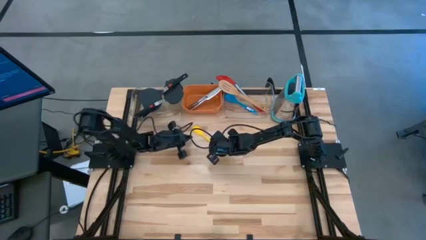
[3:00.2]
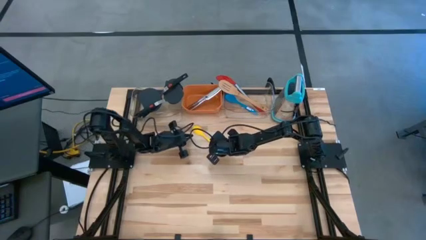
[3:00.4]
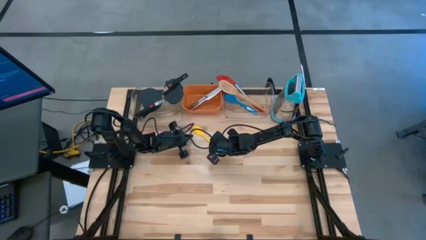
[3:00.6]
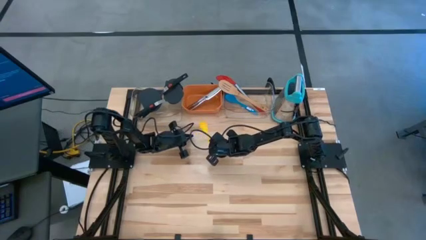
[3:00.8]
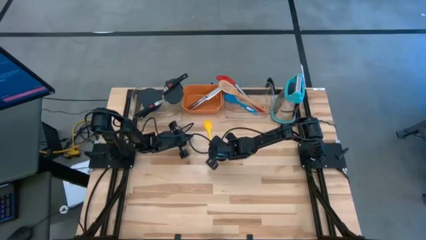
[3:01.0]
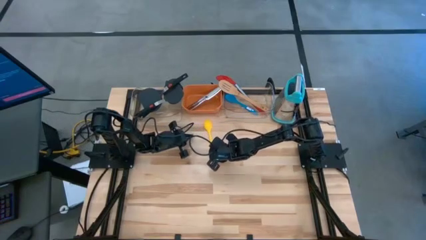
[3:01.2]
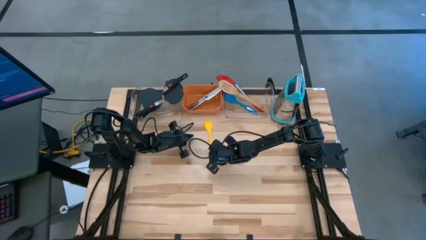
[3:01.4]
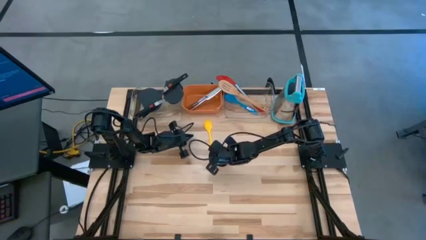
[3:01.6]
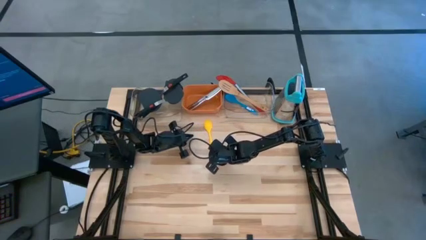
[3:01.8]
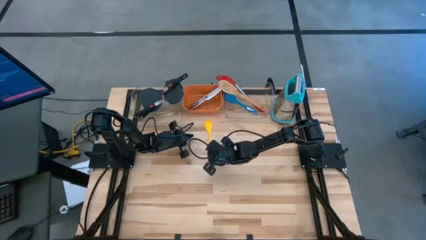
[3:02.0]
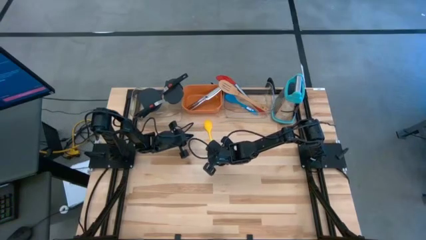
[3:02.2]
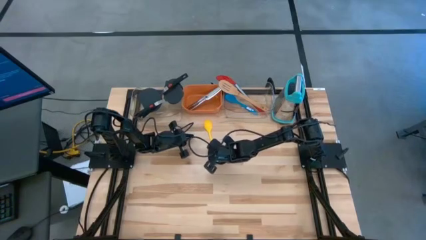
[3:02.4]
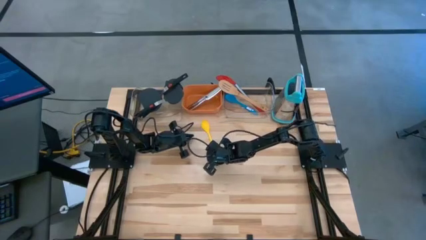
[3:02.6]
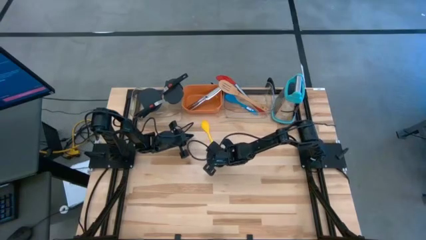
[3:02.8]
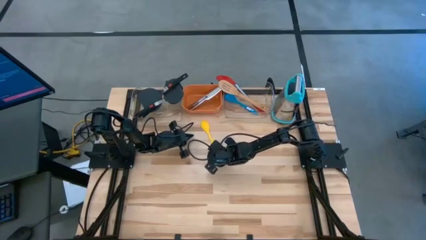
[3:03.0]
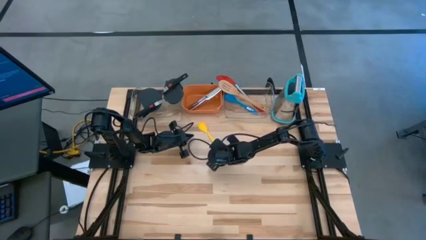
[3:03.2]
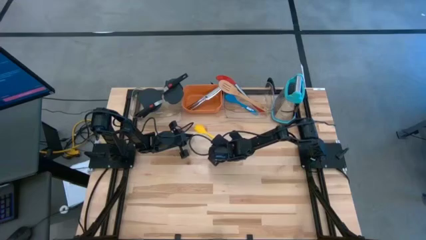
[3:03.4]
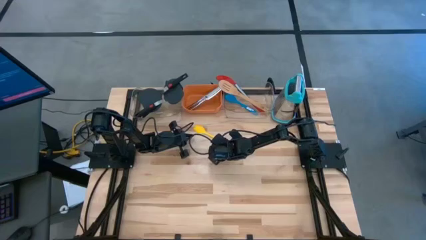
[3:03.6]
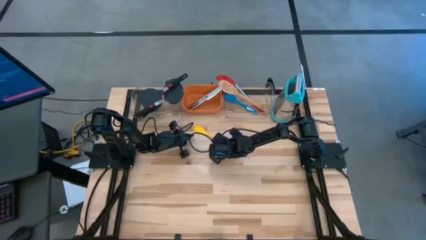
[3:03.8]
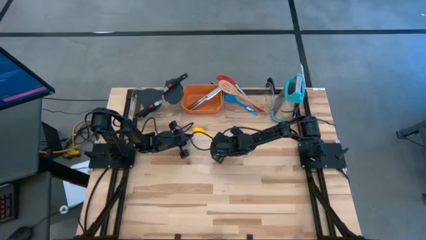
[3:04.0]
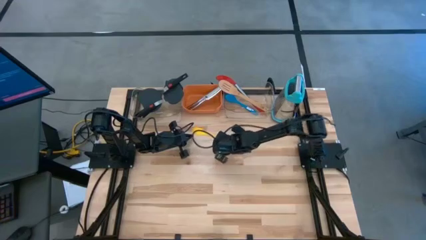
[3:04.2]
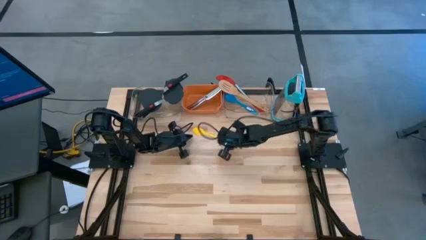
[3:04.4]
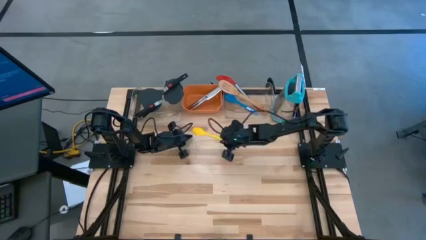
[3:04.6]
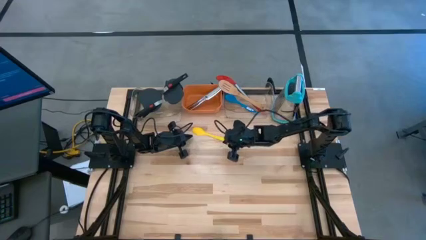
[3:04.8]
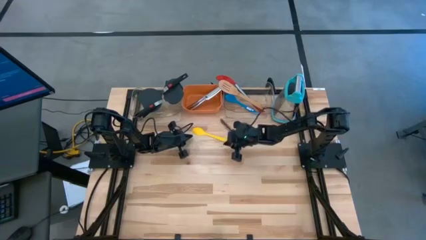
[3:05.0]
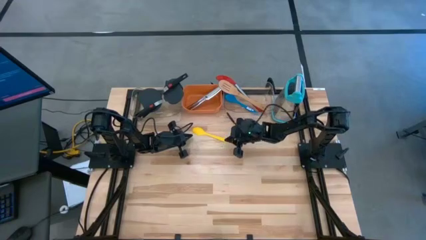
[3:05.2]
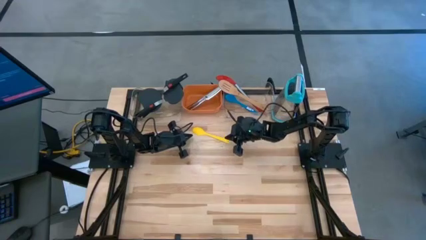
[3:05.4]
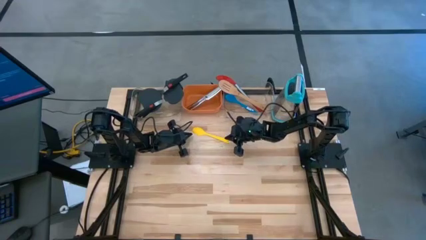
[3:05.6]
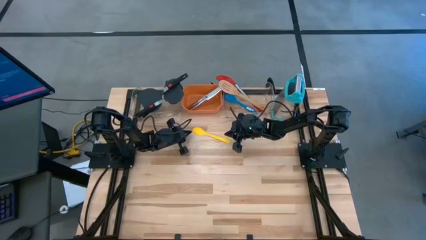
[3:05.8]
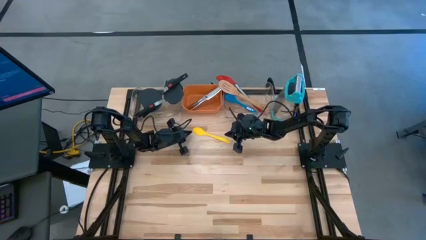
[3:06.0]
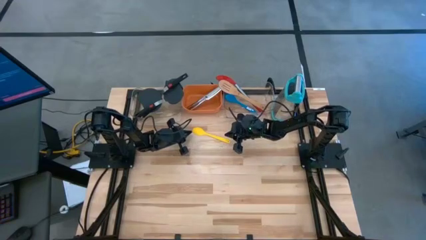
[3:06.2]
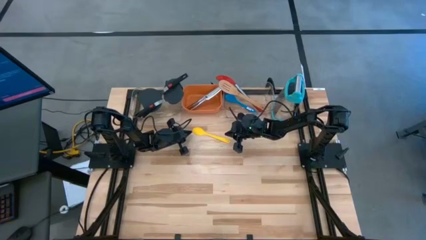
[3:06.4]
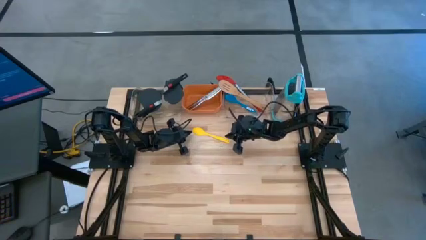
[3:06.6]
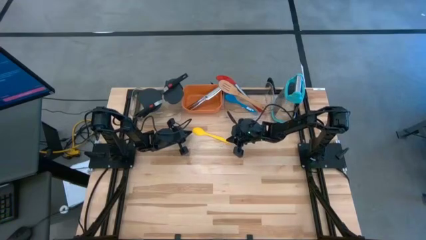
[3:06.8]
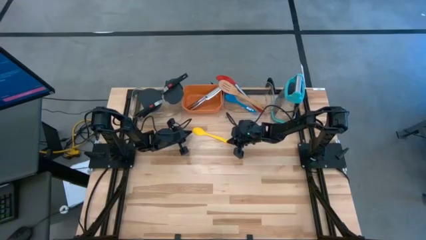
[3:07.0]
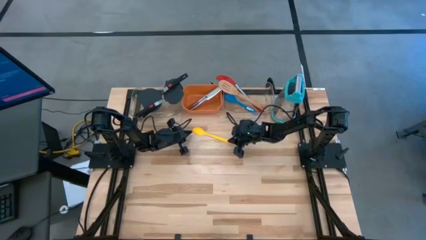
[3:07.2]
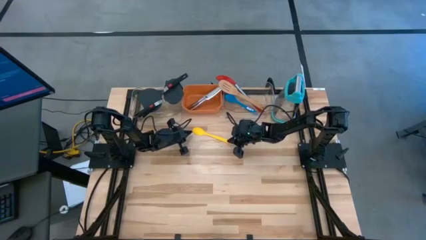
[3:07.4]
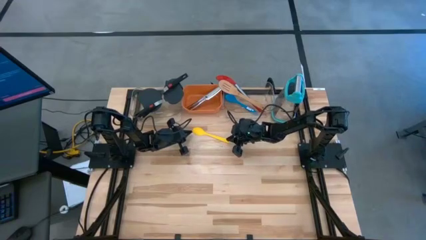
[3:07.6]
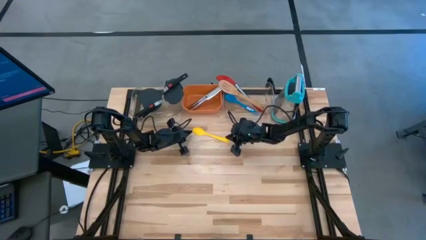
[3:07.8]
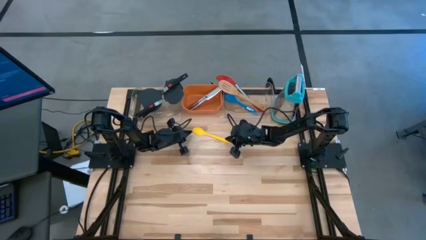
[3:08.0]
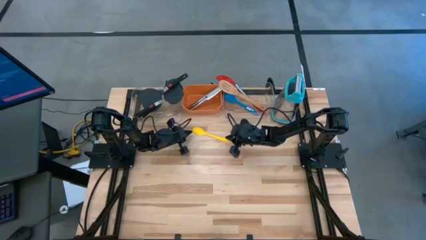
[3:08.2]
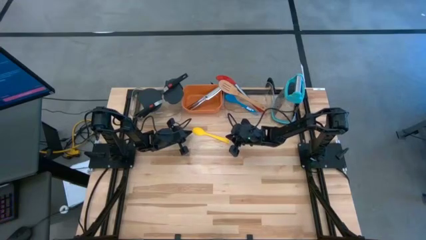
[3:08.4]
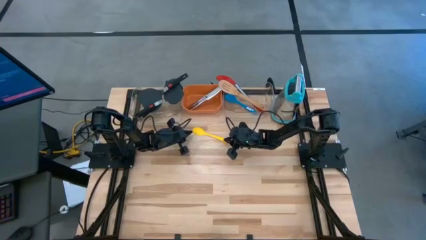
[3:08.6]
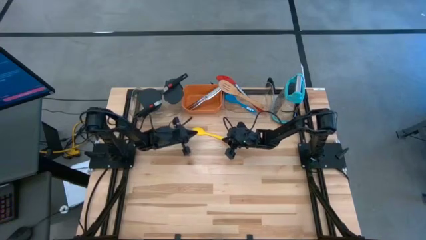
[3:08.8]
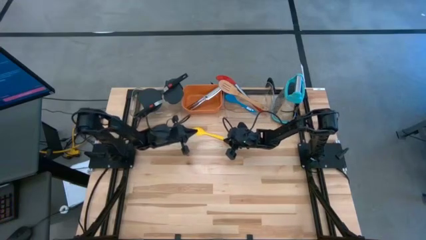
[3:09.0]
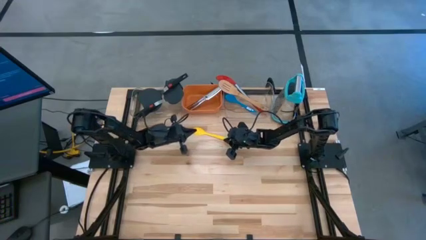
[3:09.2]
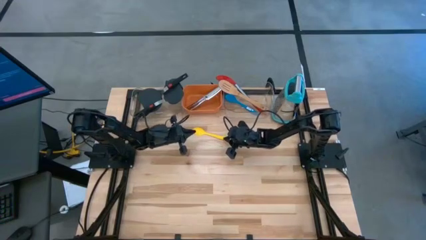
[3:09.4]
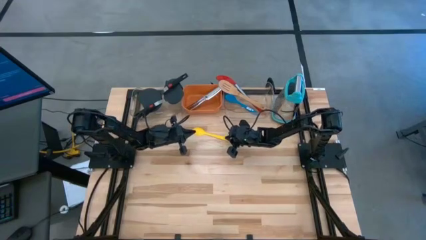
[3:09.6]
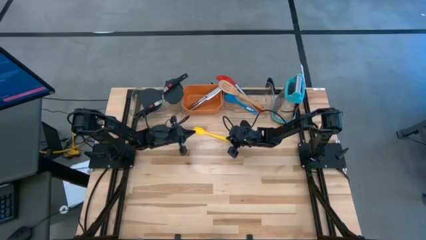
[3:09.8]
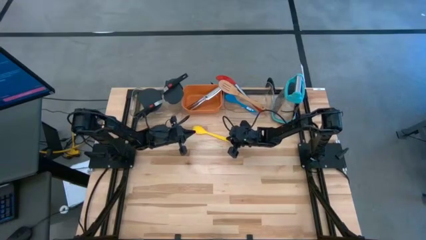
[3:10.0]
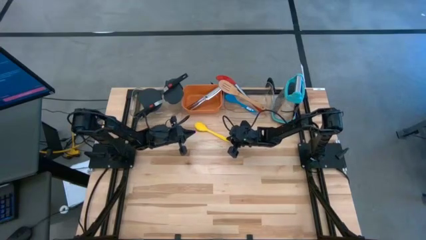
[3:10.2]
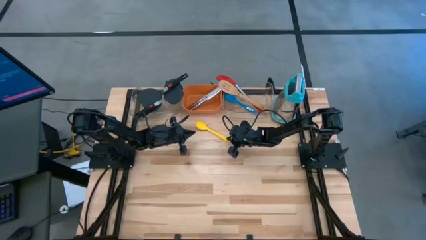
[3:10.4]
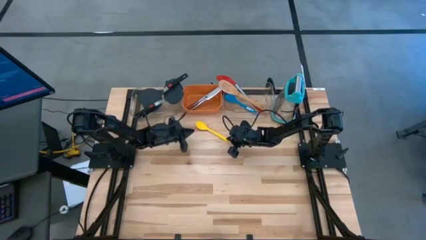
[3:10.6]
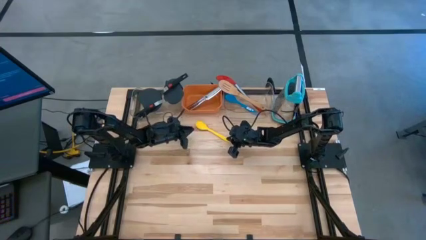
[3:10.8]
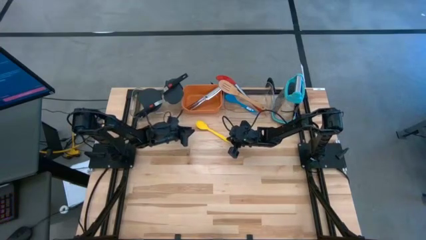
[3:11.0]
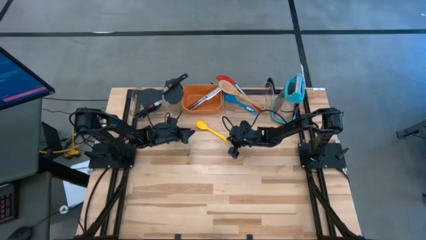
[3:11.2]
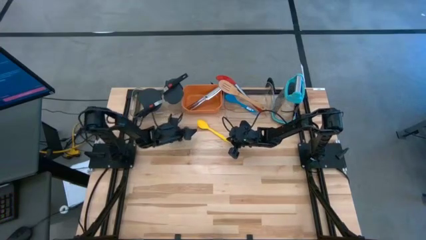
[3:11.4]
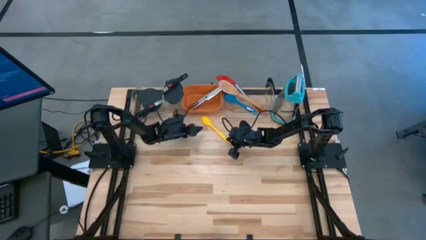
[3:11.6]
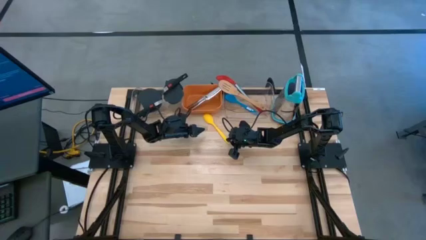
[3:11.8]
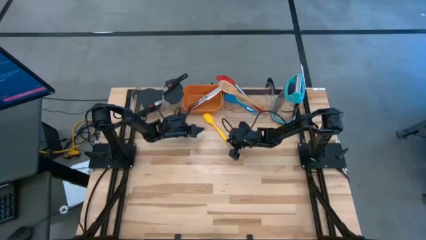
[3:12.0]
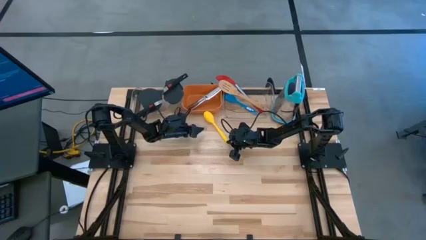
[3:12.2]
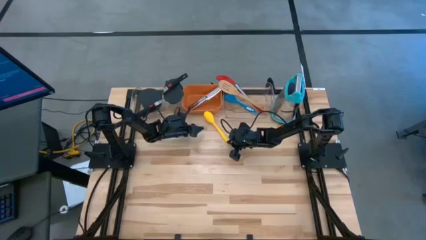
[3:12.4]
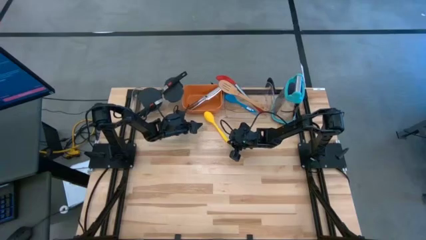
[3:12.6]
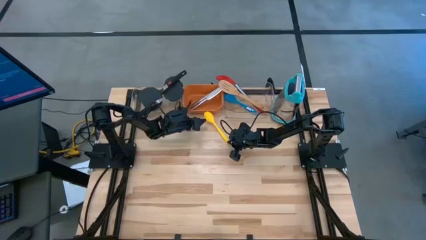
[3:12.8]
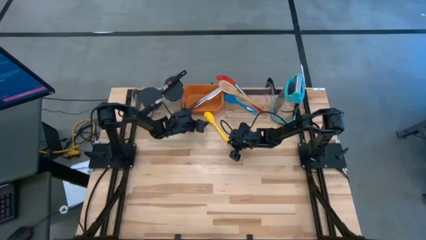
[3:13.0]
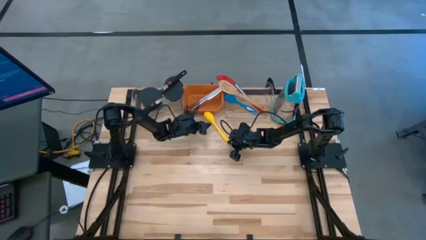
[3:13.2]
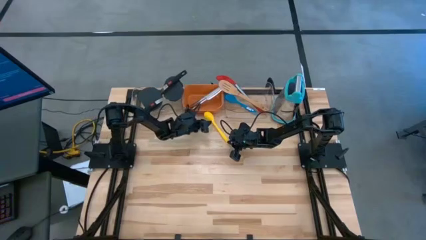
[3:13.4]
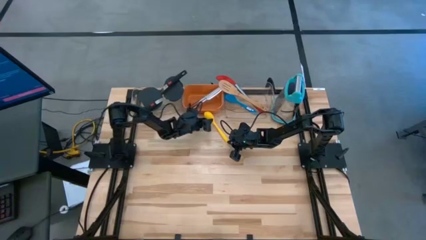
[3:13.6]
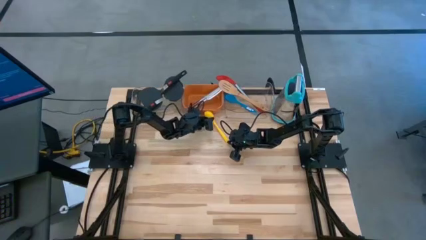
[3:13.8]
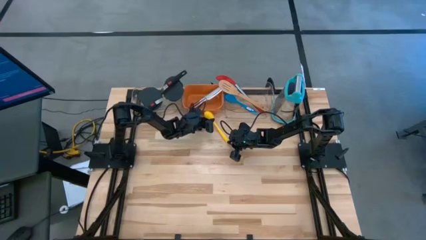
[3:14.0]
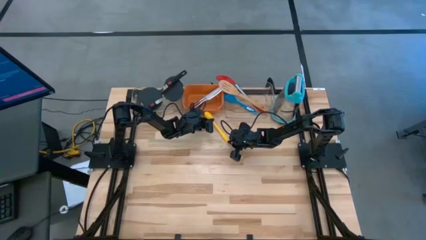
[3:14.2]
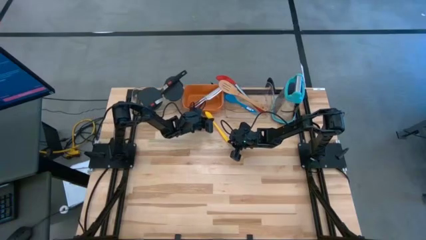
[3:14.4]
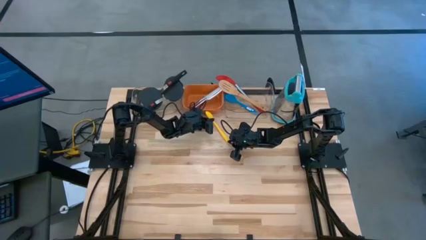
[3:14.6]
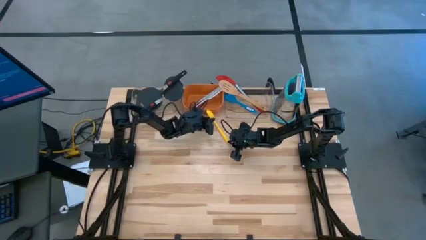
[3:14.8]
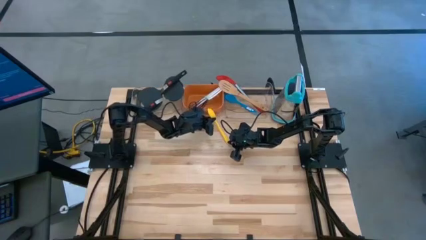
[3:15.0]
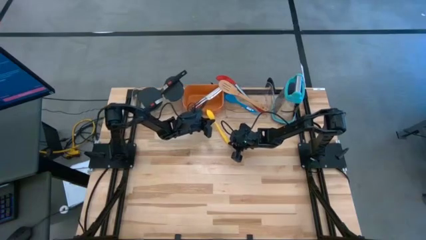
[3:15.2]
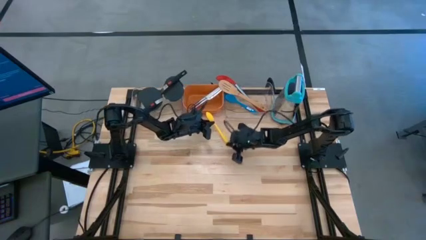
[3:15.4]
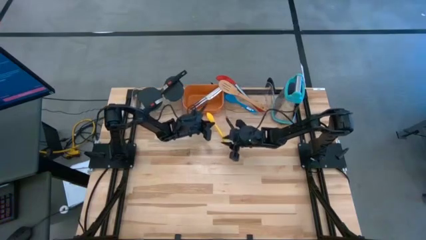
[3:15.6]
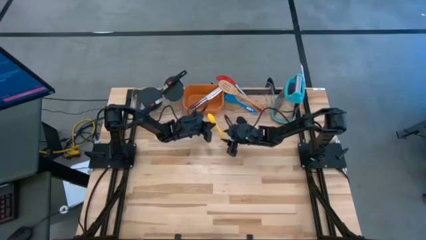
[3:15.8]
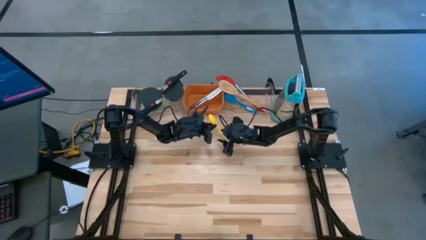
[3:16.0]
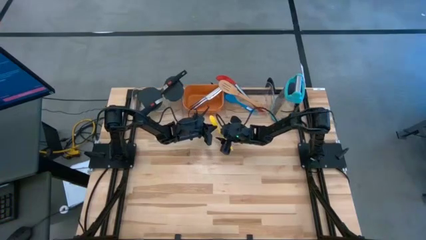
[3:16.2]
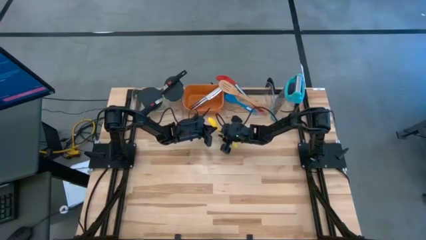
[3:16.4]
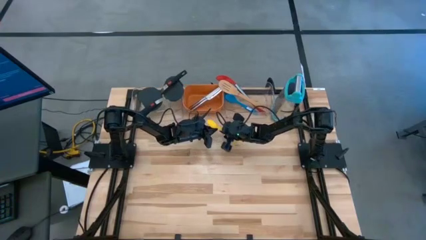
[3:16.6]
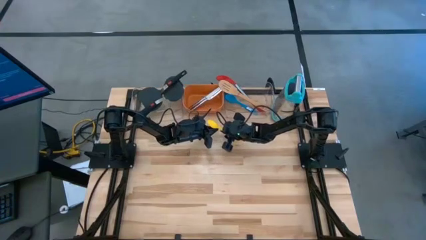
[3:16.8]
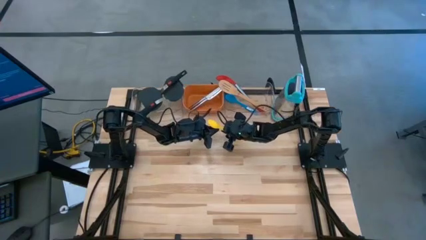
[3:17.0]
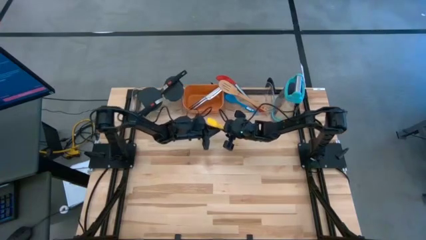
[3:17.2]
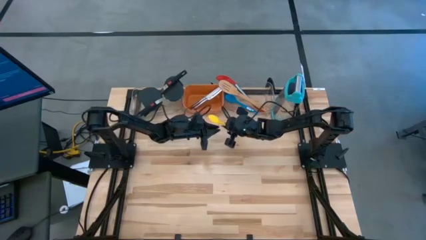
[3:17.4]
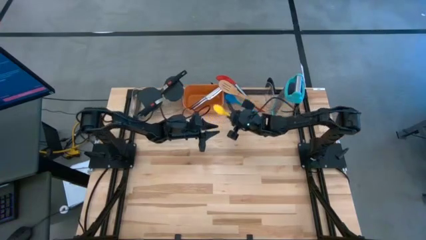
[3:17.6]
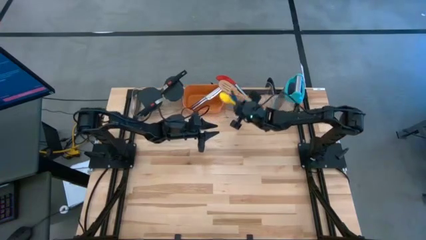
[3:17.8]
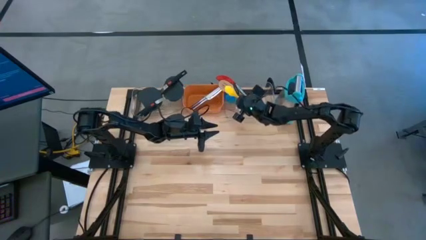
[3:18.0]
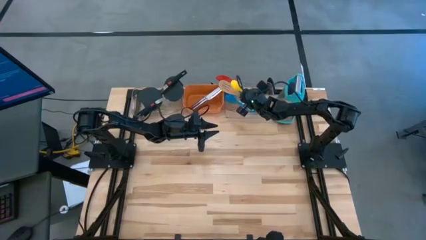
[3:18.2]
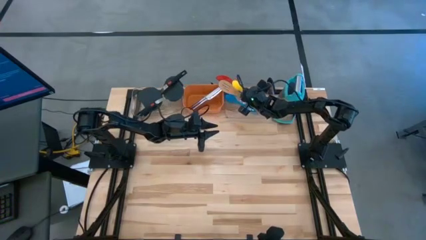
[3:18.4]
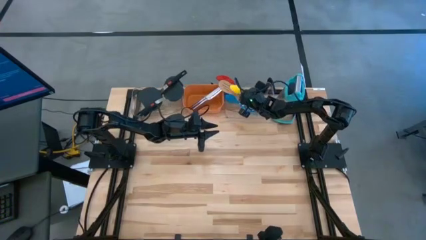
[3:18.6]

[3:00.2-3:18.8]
Task: Pick & Place Kitchen Items
Put the yellow serving spoon into the right transparent bin
